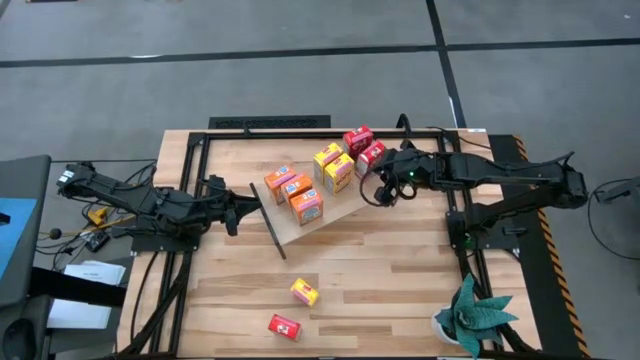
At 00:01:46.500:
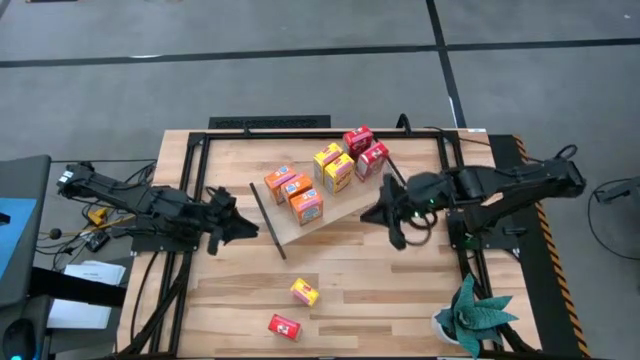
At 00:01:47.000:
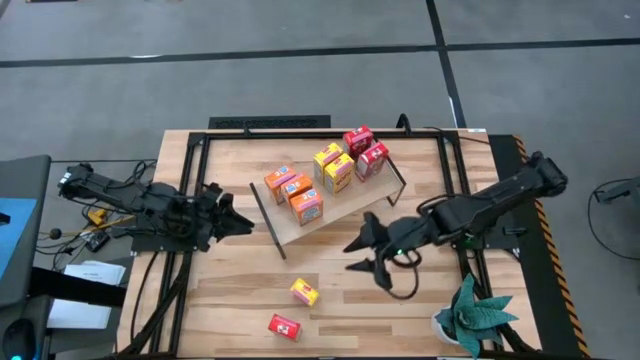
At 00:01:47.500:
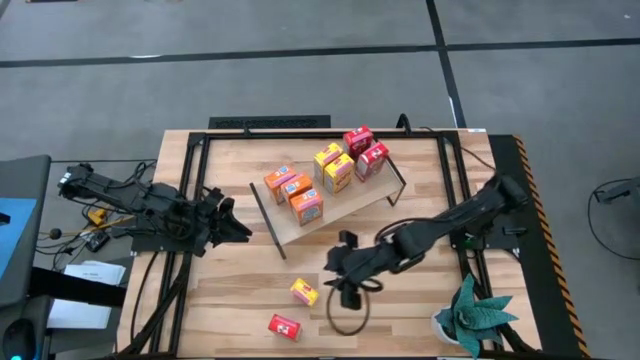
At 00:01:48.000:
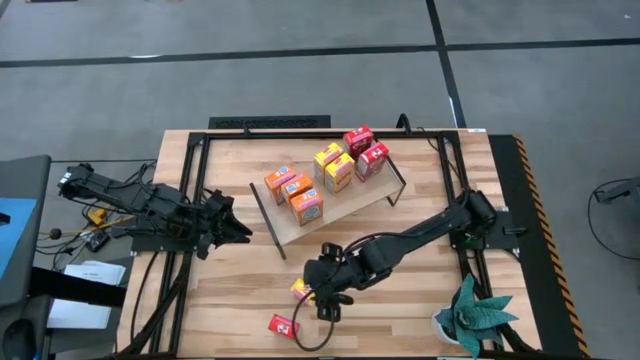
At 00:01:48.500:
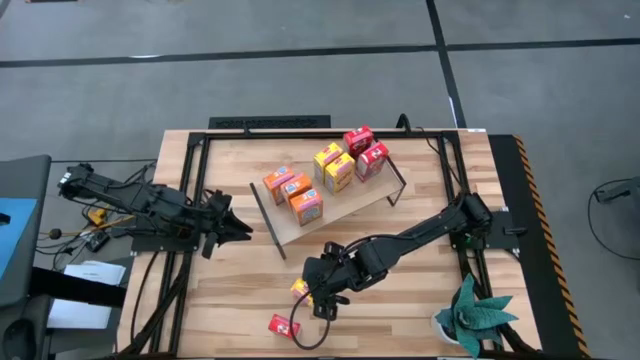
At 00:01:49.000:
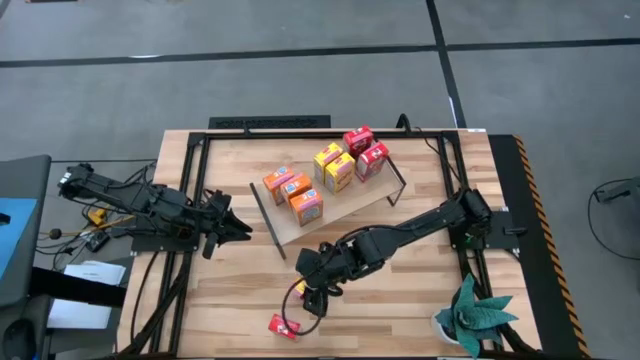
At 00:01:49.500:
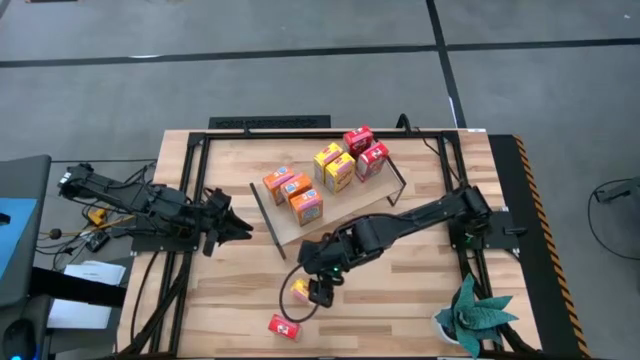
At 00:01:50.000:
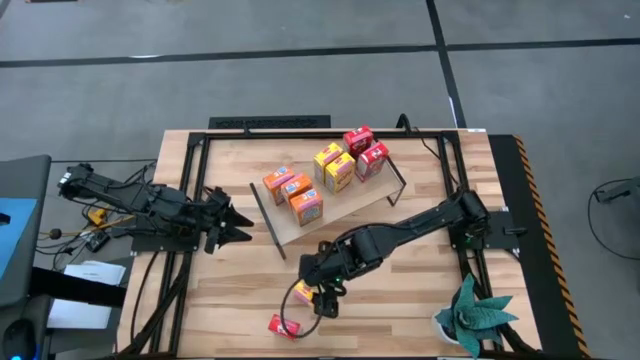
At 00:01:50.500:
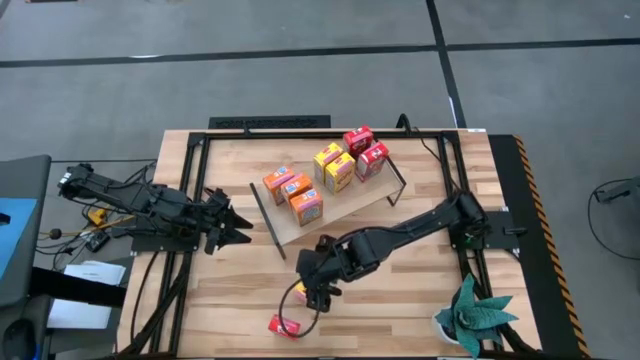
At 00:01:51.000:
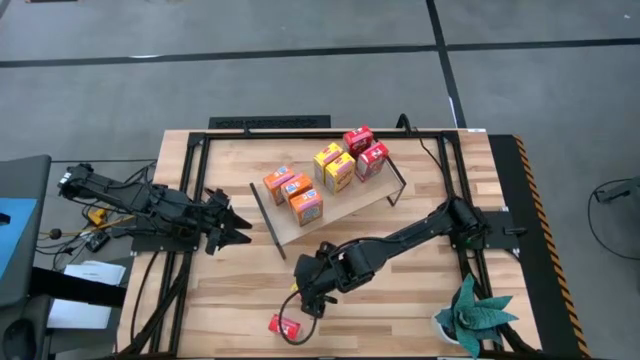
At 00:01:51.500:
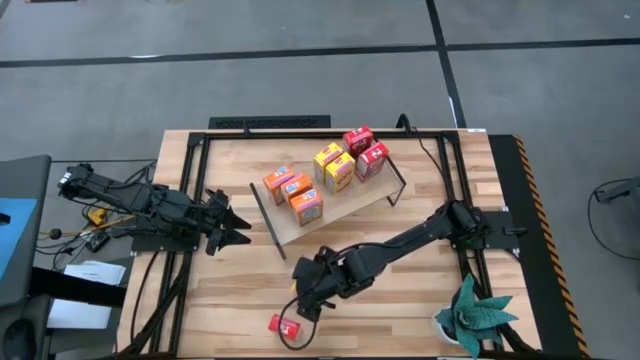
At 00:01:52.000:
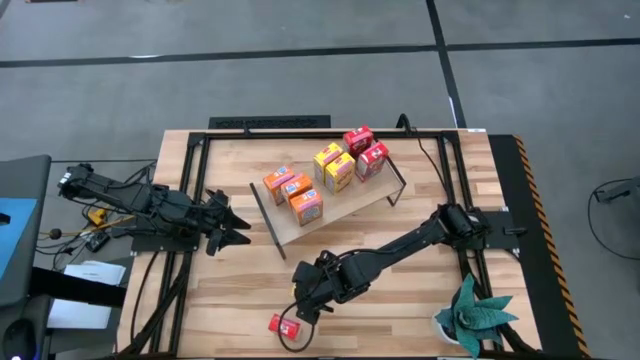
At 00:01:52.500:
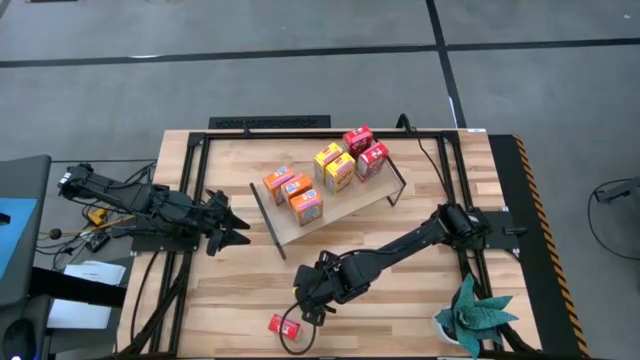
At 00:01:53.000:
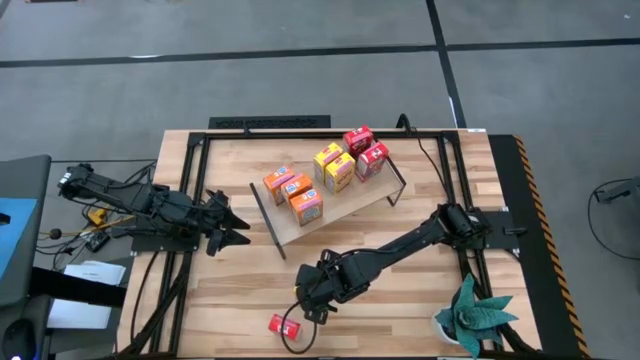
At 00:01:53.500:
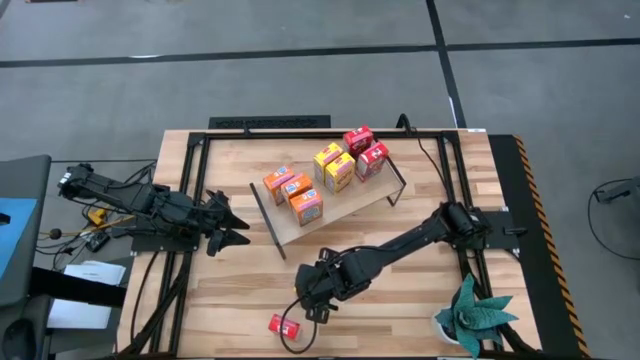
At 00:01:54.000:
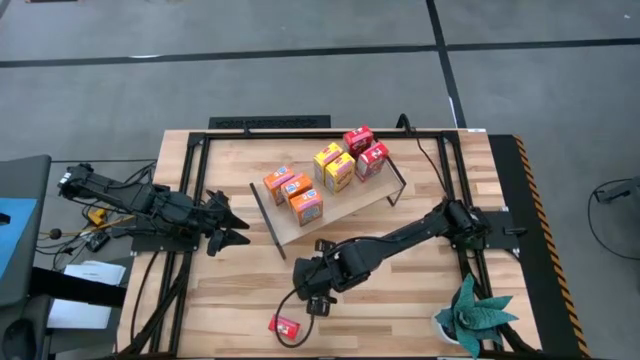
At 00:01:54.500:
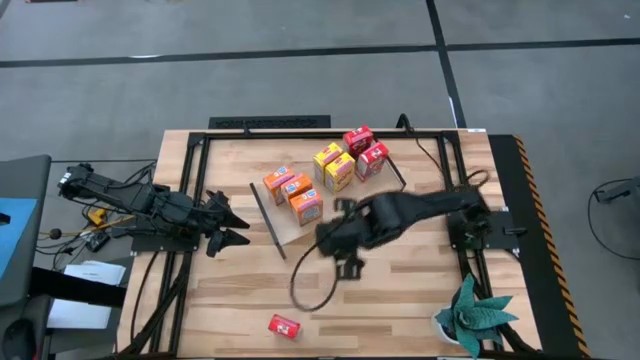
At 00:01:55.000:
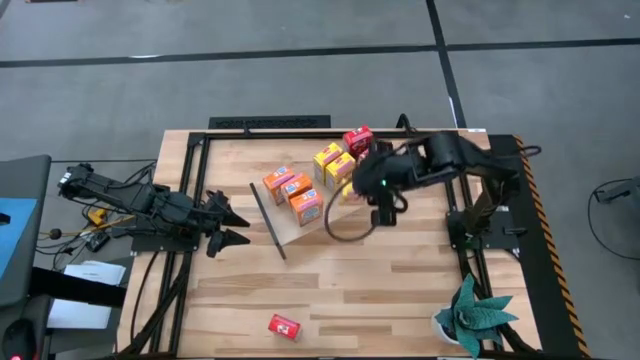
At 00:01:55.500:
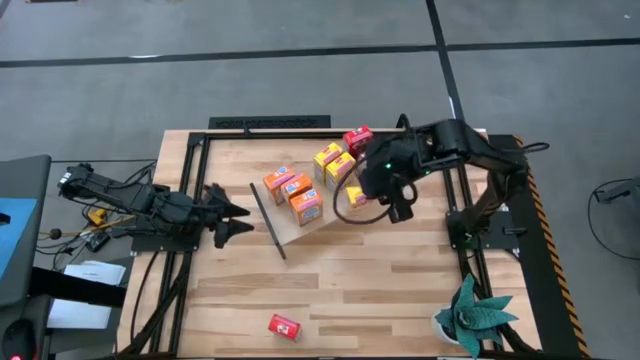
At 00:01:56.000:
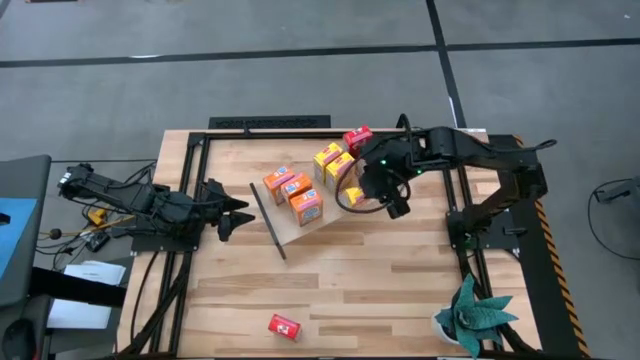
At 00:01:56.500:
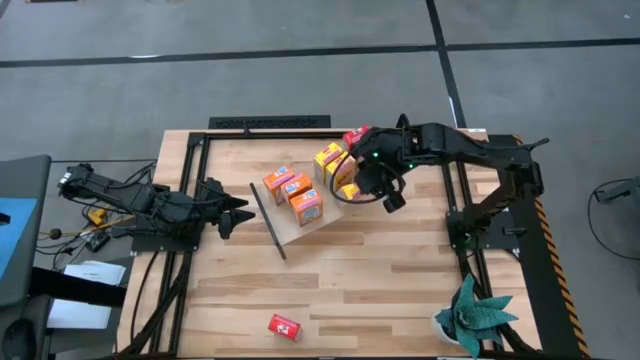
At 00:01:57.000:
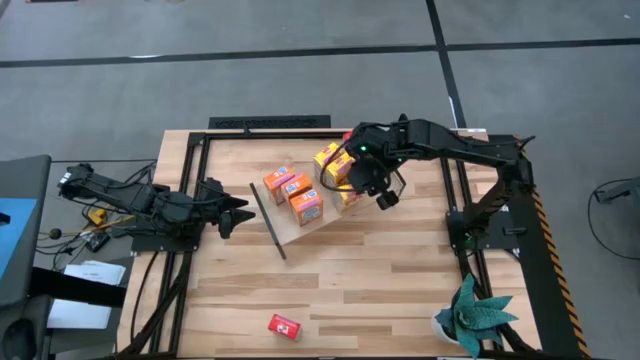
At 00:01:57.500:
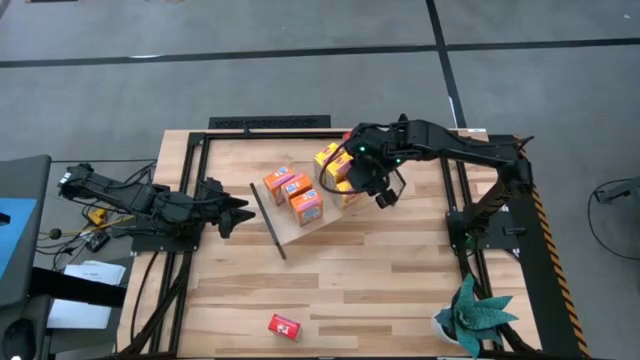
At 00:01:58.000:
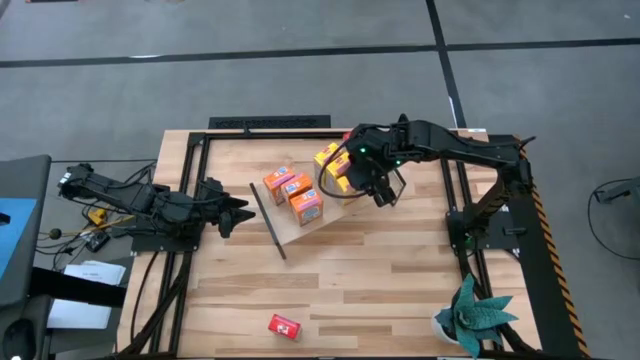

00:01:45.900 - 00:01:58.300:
Task: Stack cereal on shelf
Put the yellow cereal box on the shelf aligned with the other yellow cereal box
